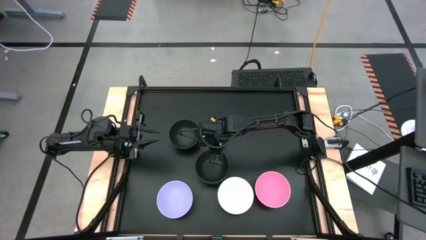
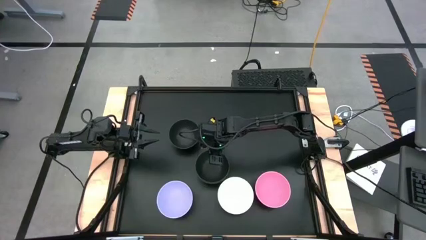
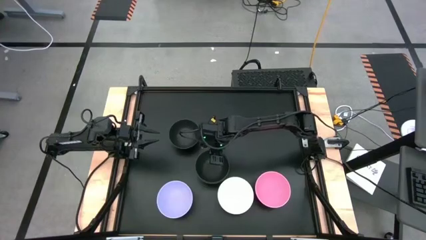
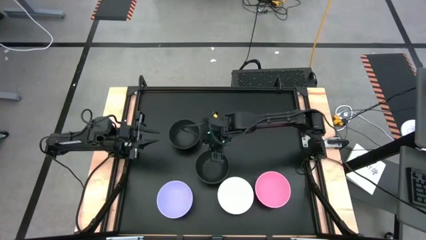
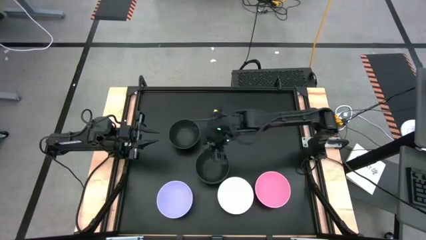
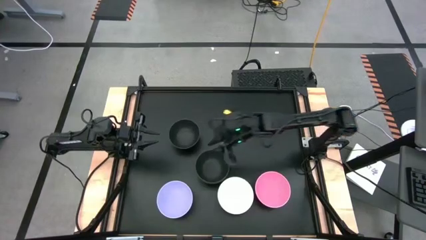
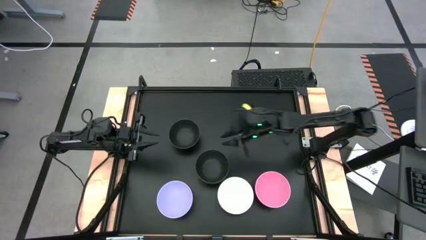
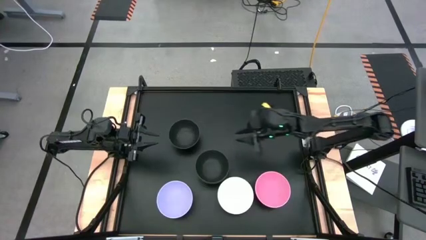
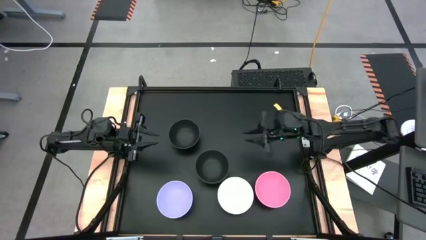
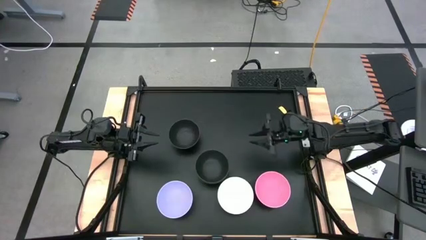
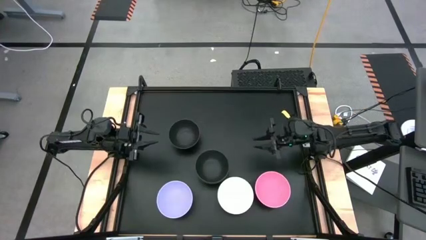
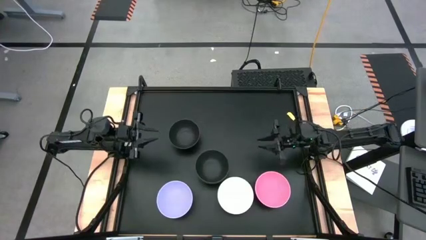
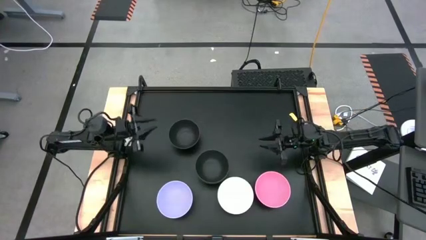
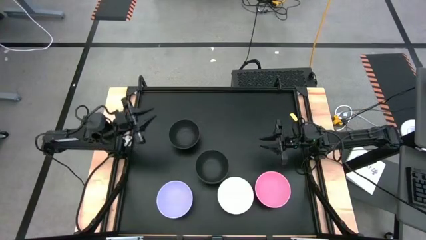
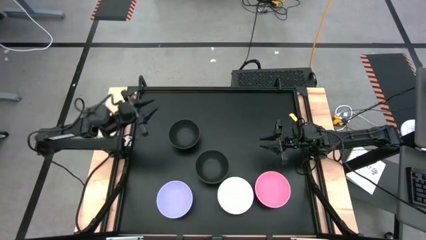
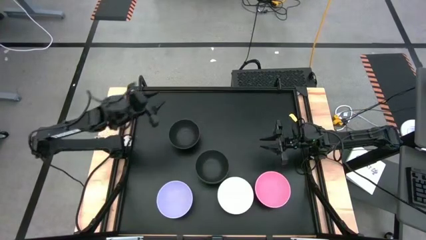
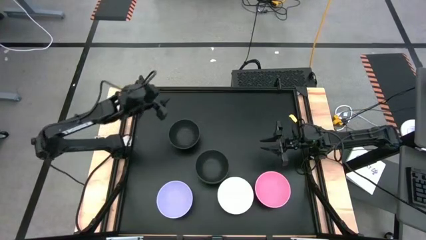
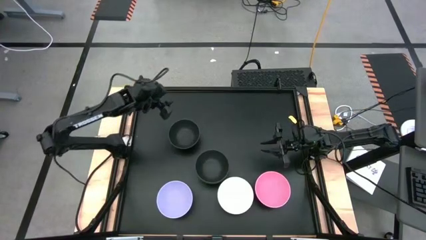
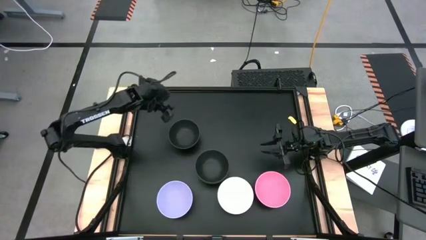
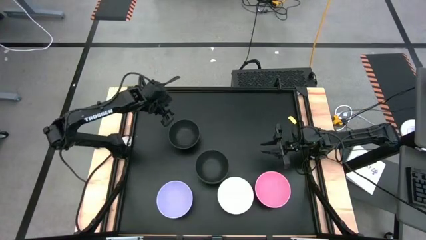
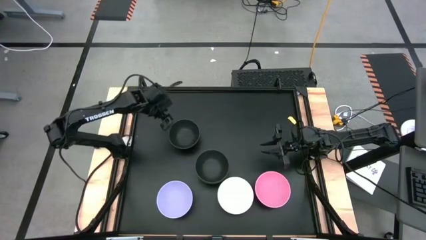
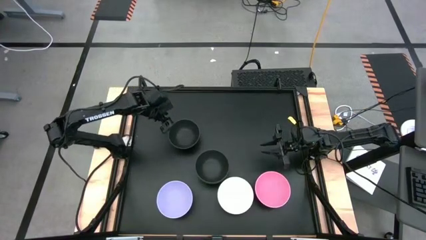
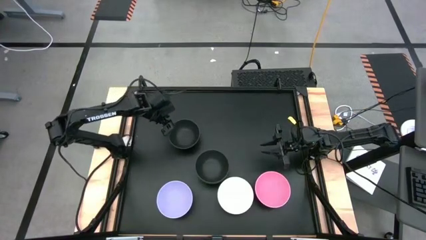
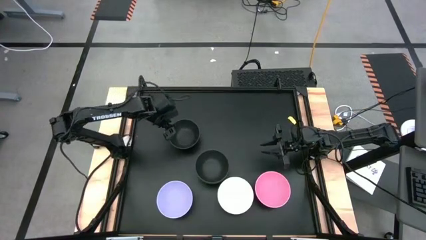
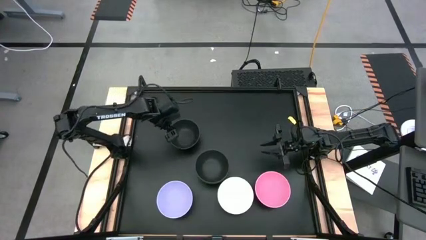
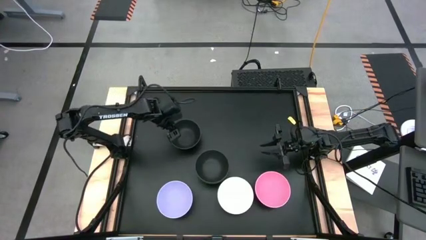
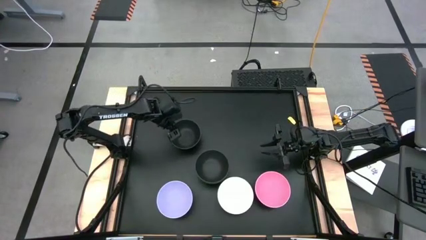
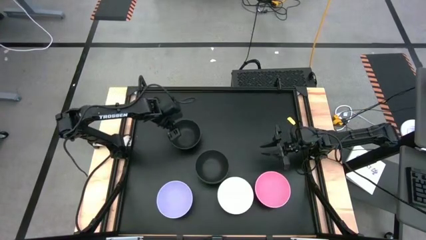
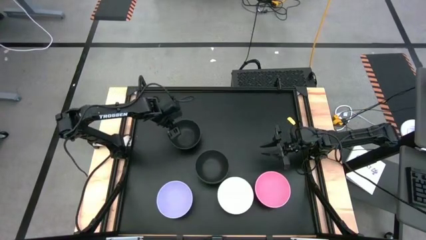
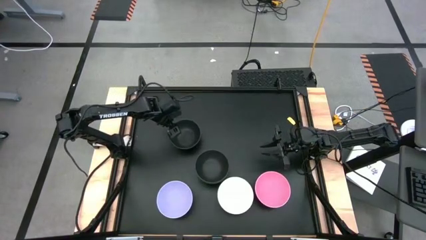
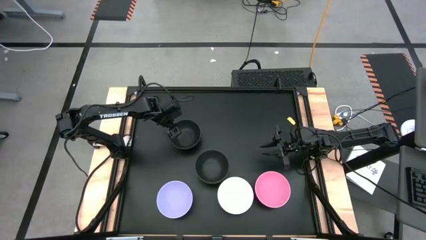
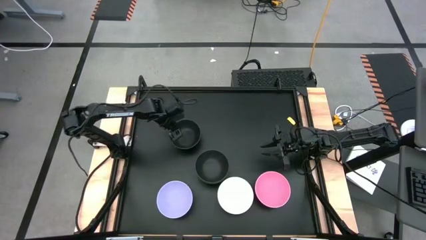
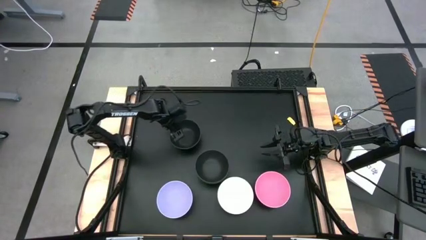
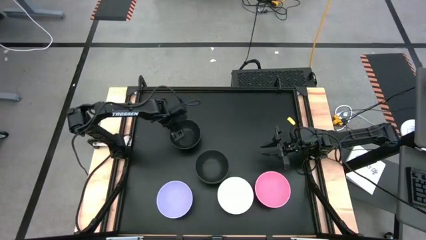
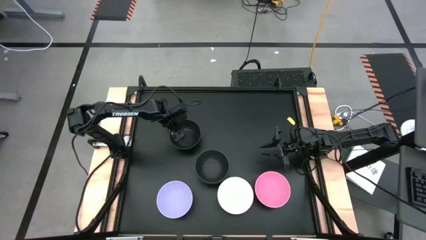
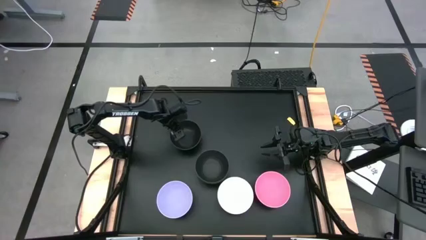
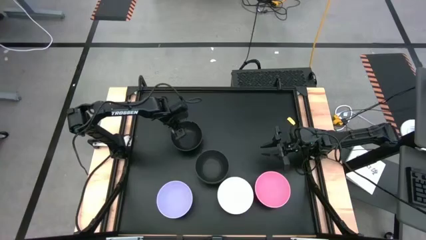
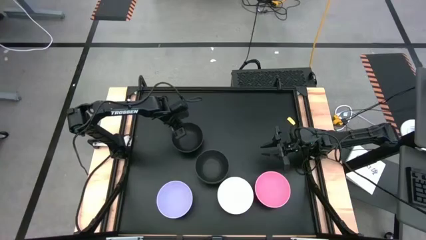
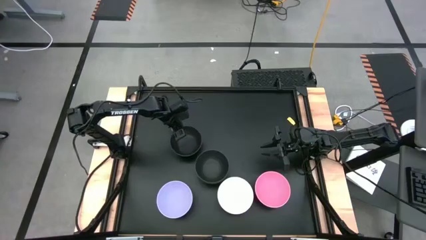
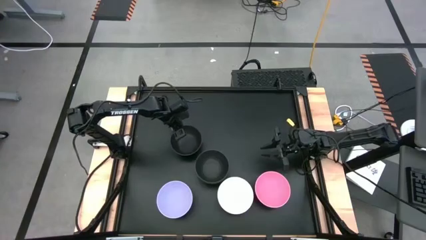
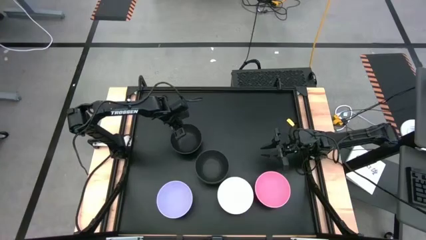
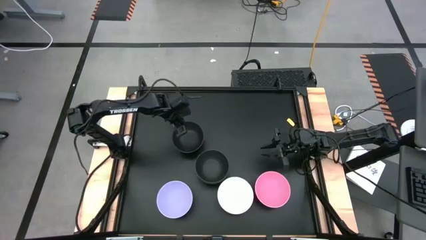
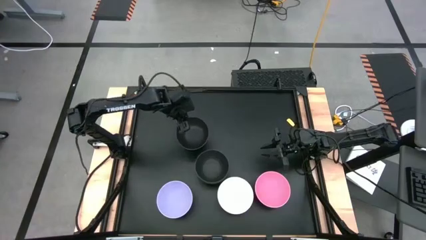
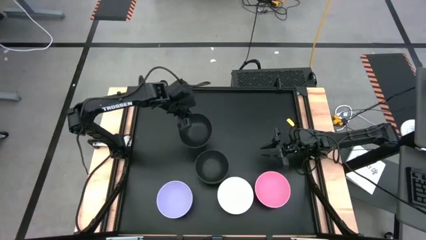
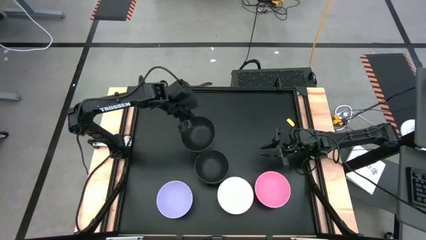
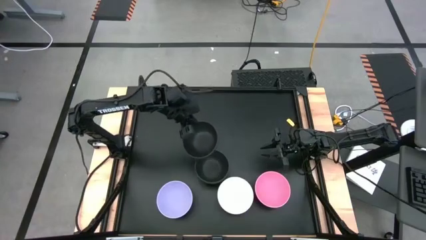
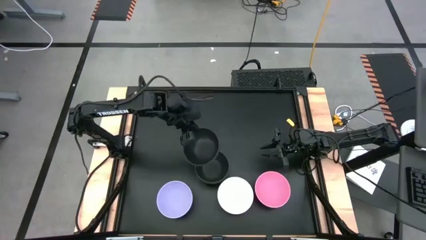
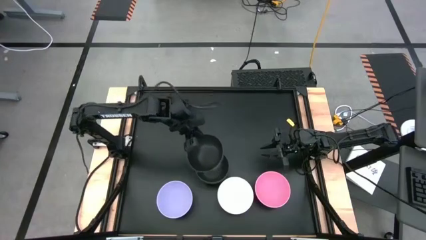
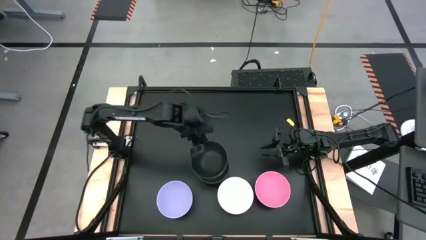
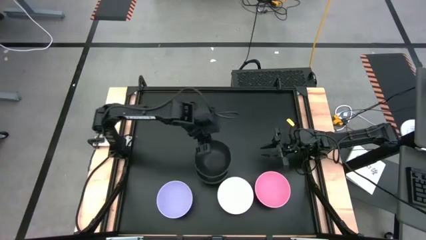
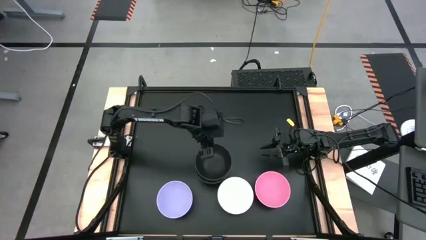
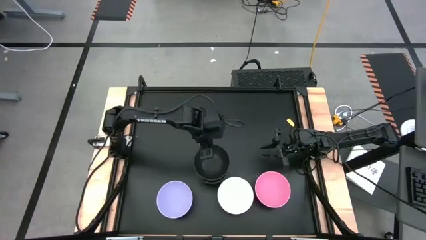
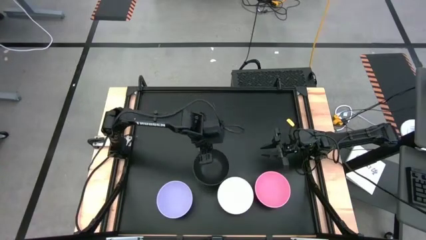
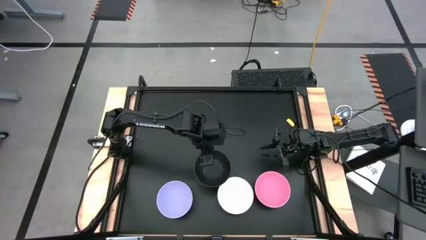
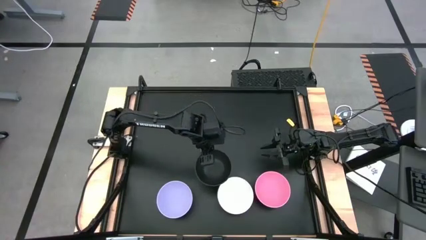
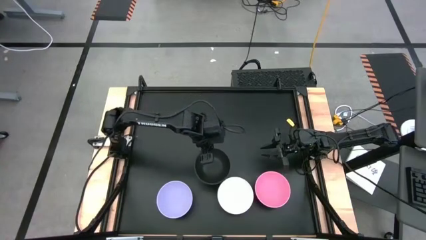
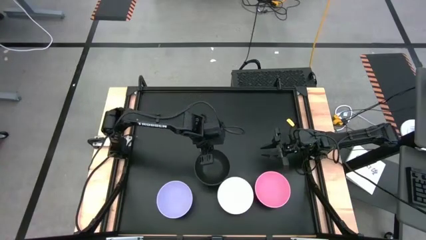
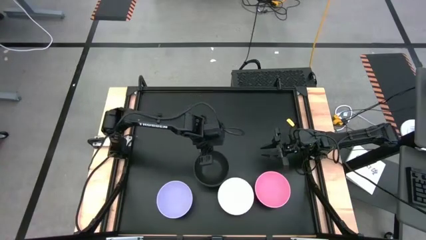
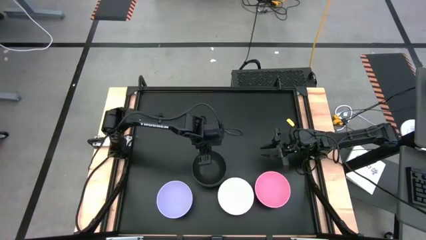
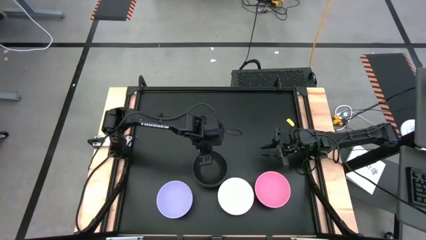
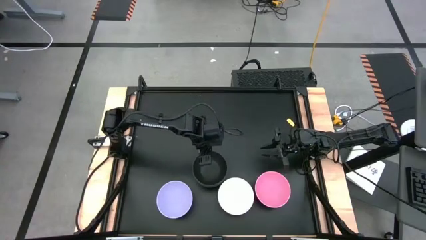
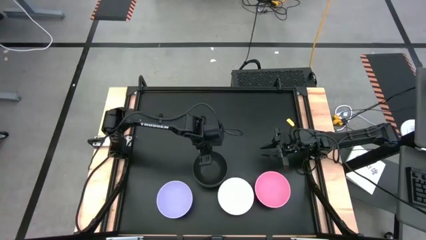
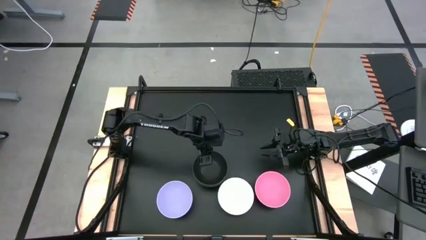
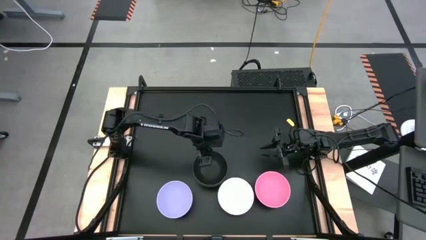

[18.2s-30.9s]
Task: Nest bowls inside each other
Stack the top black bowl on top of the black bowl
